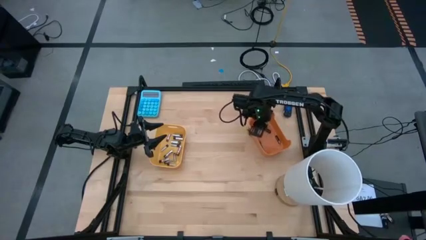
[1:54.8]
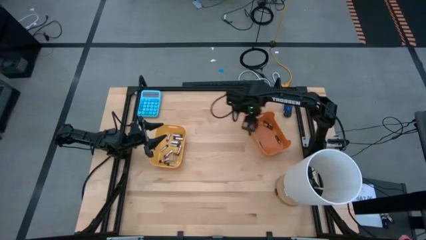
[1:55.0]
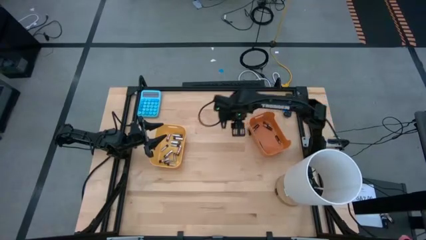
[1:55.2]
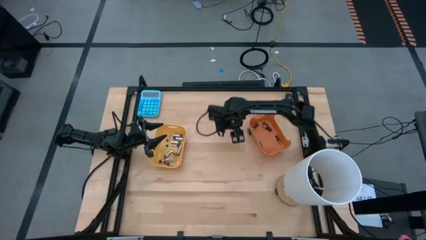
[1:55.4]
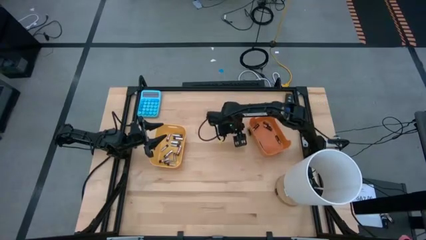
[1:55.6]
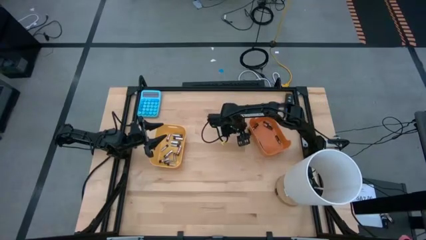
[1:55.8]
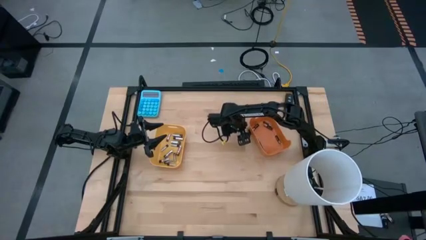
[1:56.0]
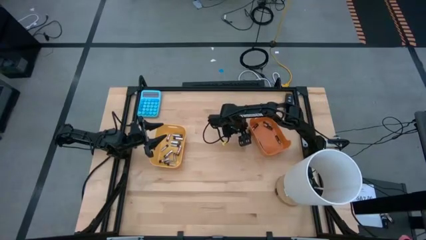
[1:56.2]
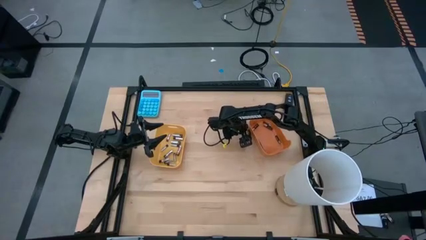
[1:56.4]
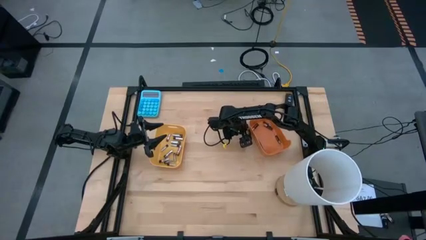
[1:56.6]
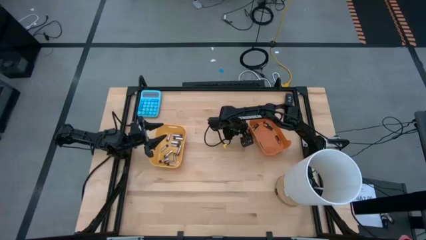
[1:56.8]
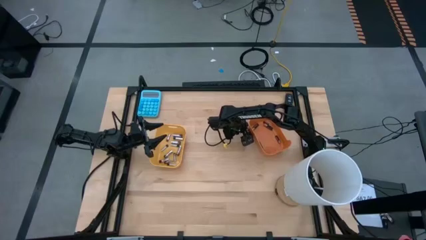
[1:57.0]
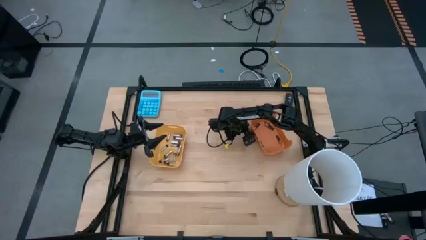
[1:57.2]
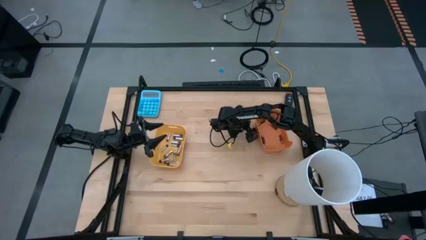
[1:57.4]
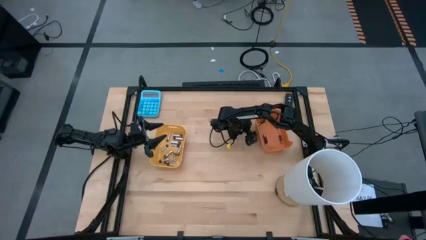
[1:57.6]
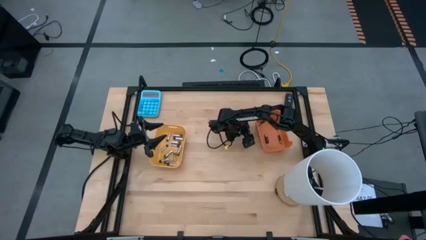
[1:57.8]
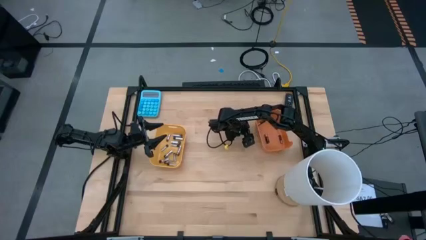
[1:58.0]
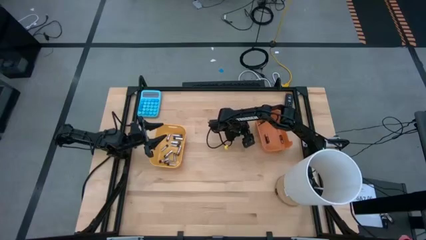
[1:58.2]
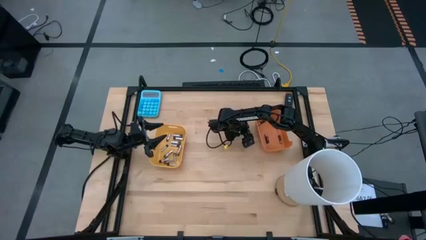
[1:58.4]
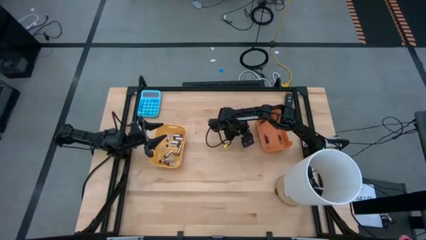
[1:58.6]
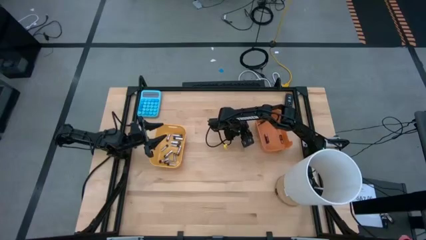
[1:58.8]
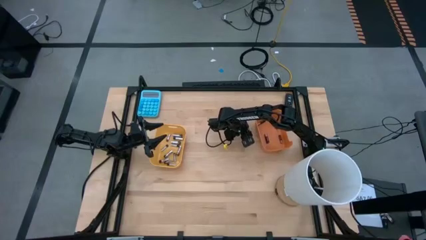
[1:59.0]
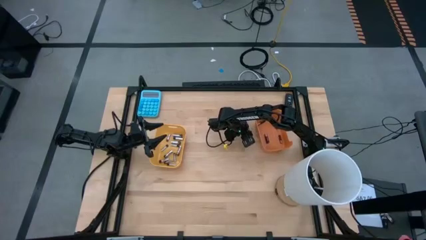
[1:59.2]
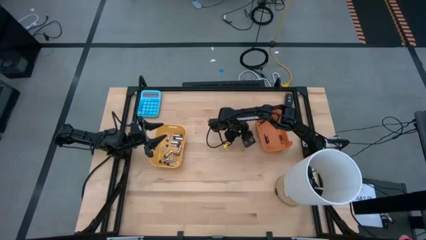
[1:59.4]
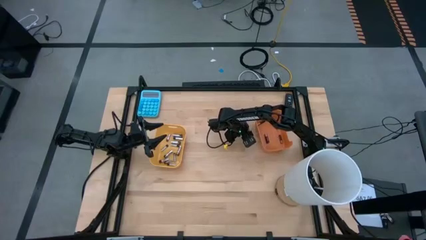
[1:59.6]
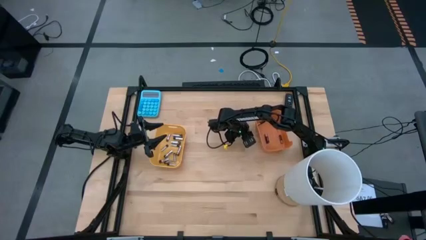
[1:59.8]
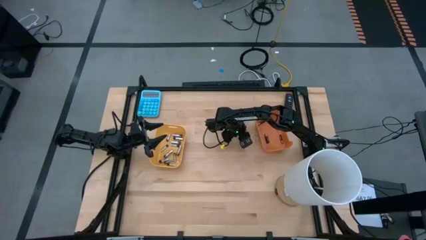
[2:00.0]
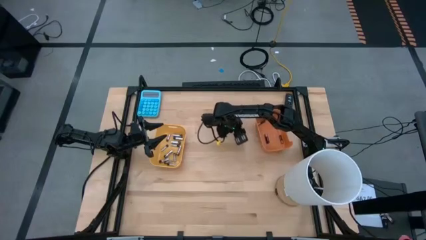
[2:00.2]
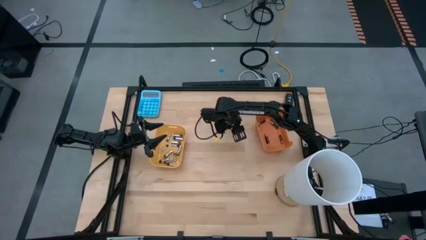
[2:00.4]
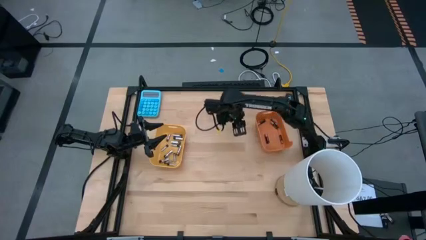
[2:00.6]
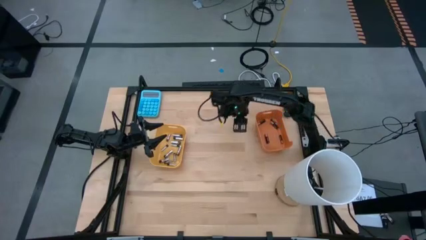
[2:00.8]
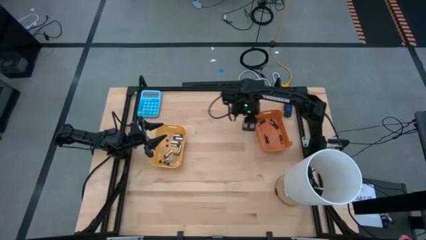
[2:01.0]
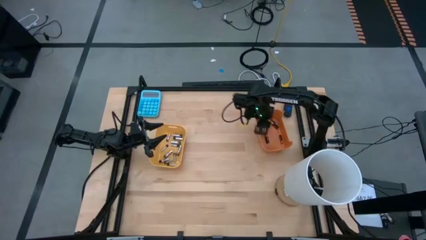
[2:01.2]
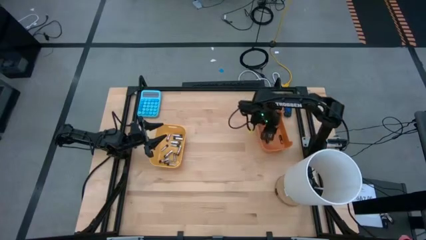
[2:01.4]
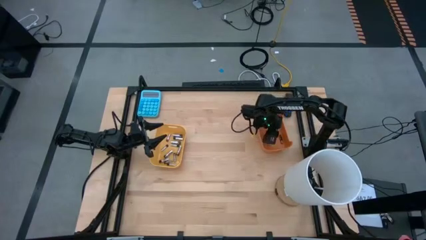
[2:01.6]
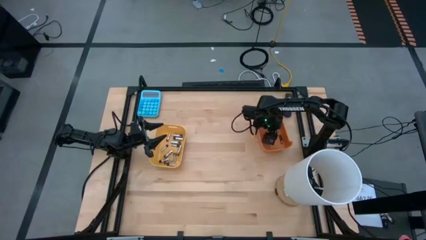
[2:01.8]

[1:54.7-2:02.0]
Task: Sort batteries
Put the black battery into the orange bin

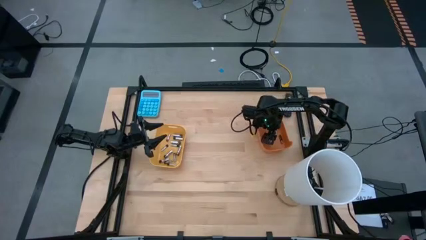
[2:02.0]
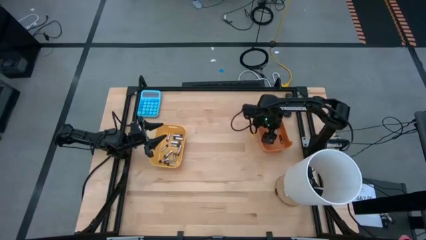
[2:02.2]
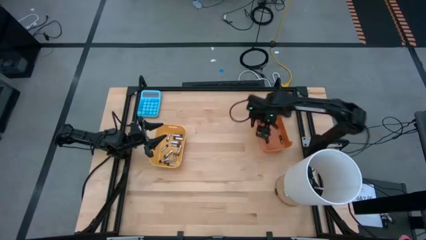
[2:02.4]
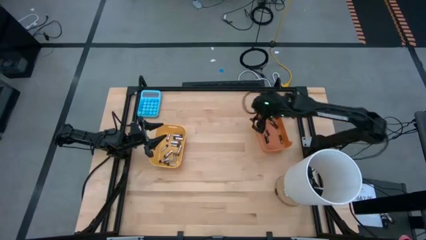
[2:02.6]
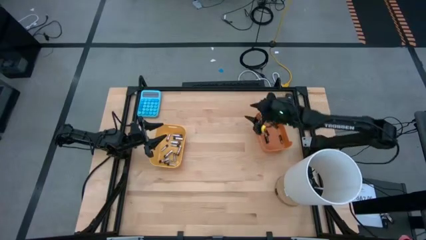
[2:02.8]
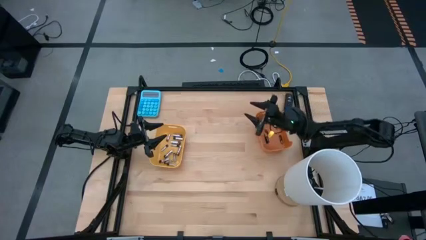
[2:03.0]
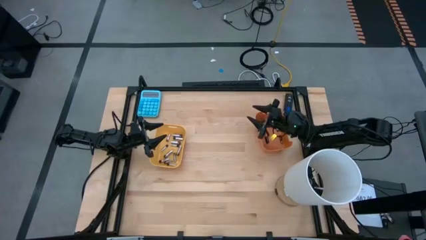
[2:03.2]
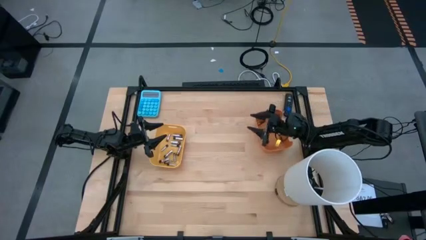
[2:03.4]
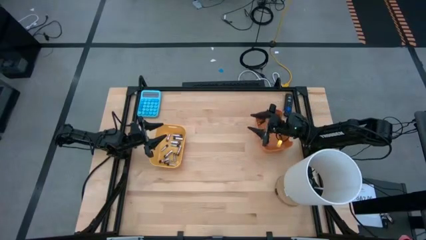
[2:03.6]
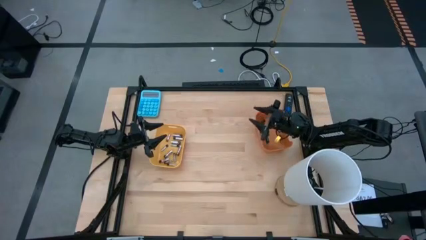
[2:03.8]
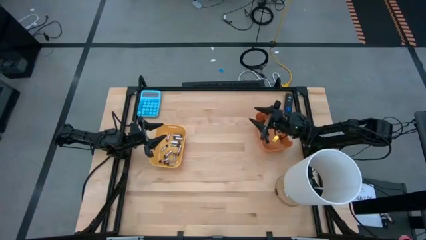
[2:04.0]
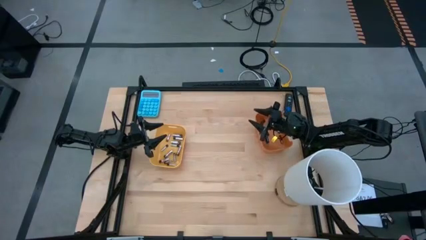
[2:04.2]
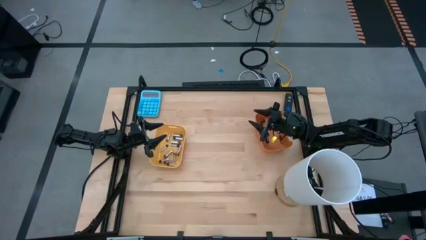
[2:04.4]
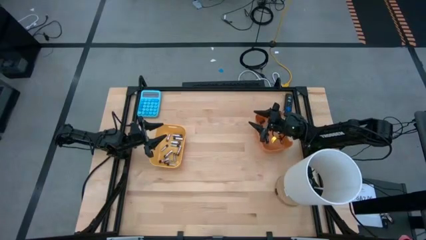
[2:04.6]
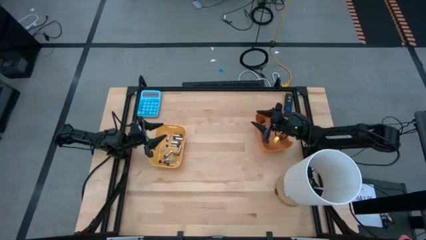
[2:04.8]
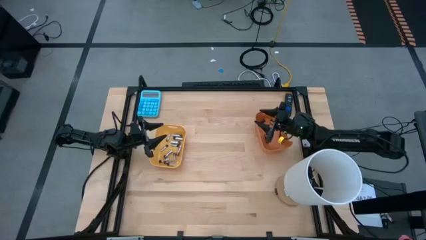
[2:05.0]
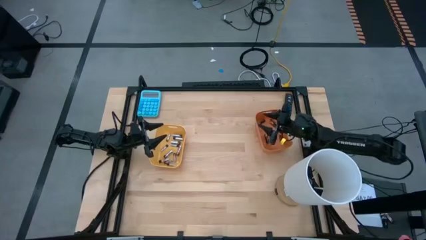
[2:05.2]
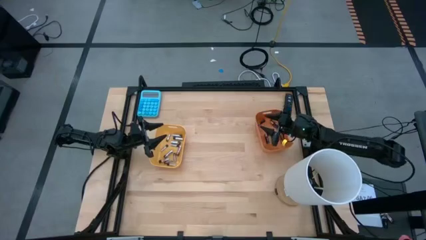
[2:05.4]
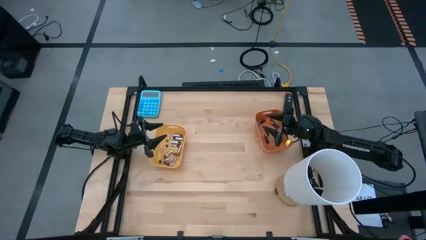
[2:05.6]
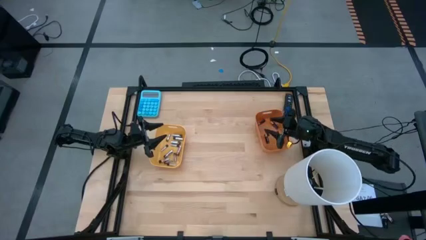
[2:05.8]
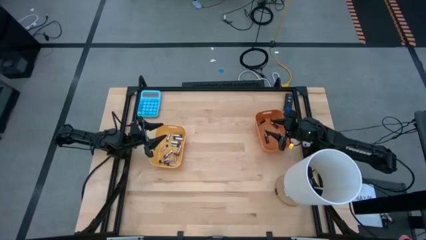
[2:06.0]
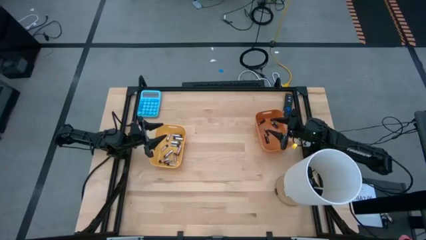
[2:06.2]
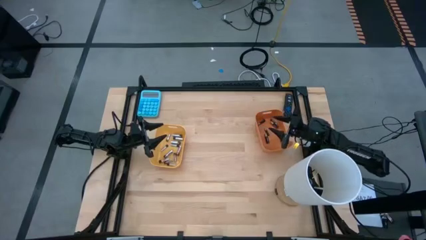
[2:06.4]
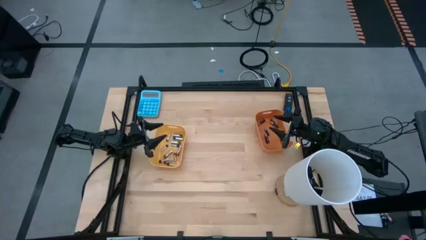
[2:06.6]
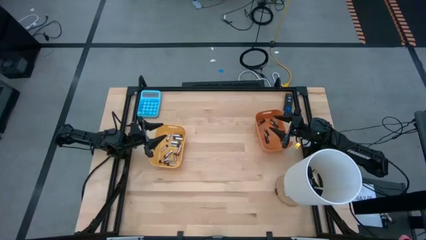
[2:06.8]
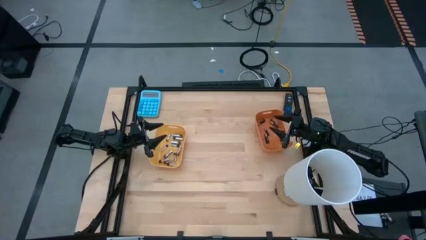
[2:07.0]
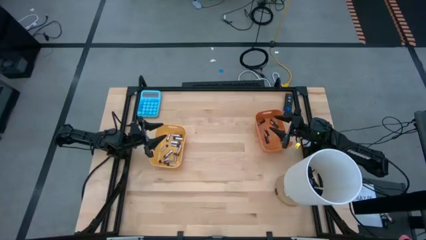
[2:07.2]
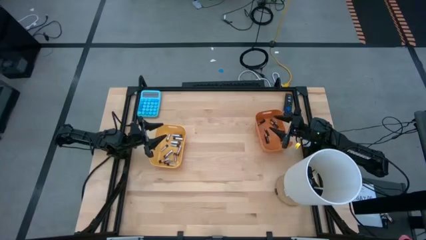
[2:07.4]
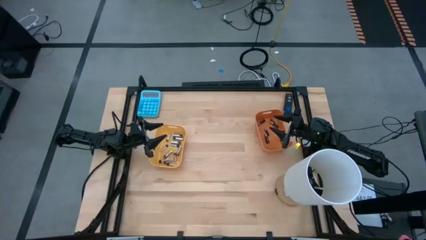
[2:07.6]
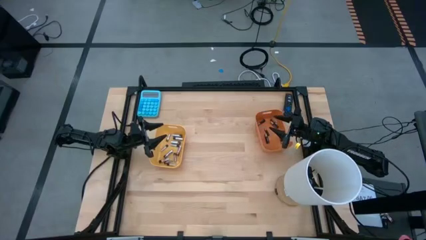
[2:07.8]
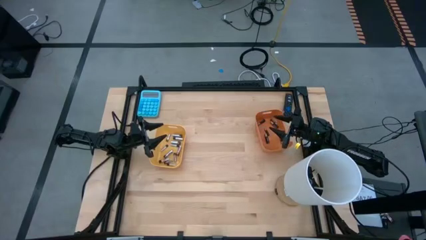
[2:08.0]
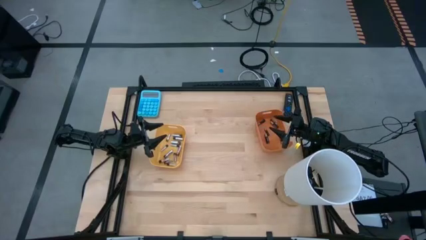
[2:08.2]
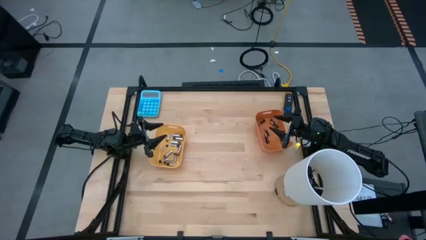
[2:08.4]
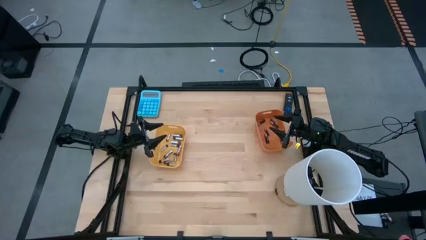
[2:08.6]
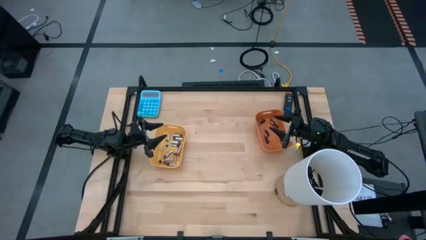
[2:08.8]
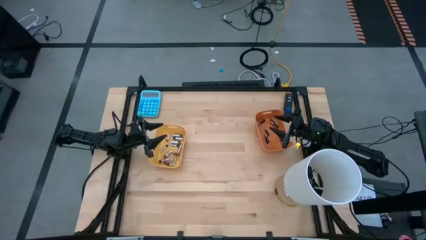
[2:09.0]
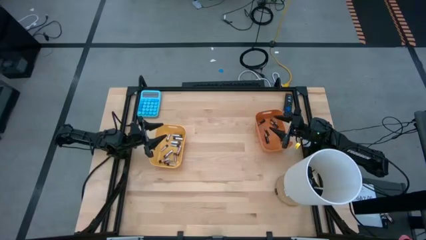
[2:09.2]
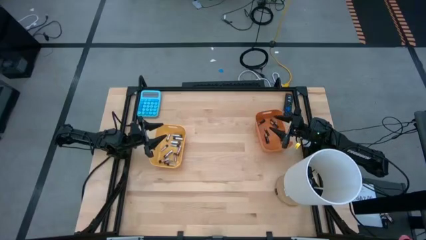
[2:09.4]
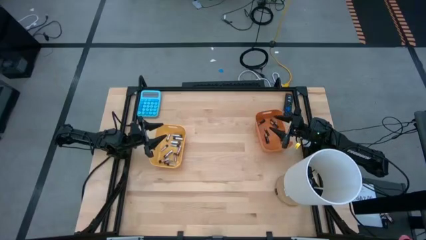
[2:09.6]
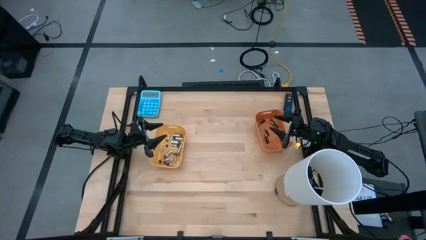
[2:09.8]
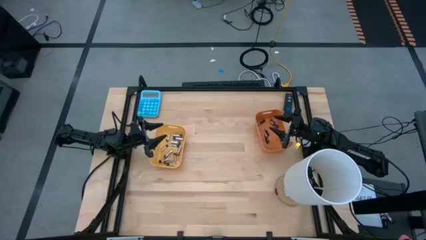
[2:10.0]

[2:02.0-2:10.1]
Return to Home Position
